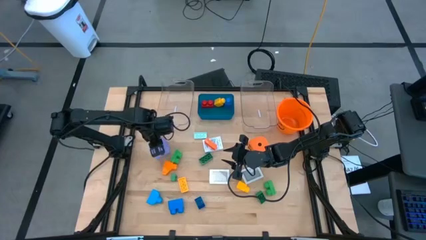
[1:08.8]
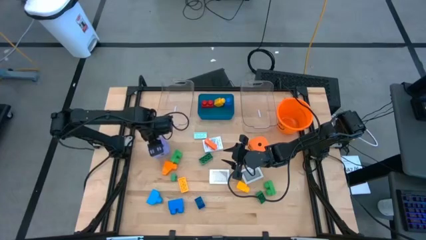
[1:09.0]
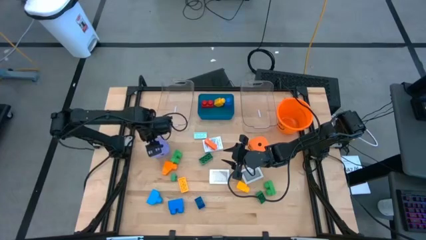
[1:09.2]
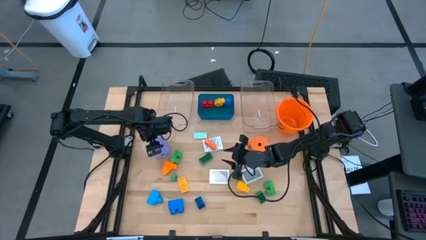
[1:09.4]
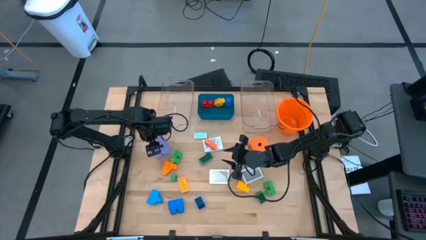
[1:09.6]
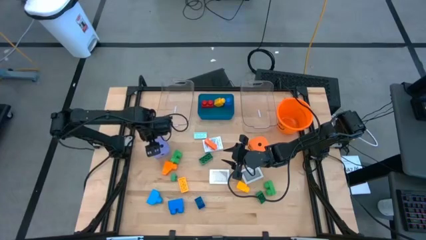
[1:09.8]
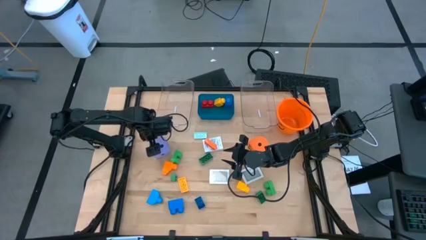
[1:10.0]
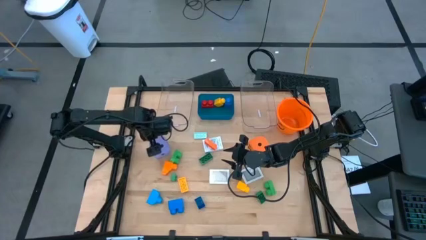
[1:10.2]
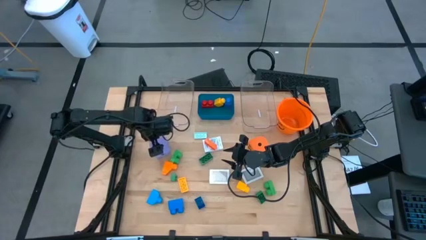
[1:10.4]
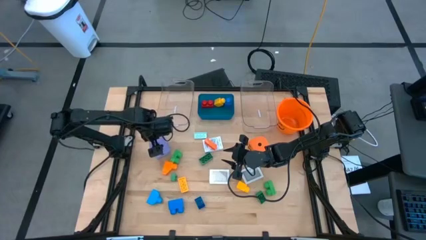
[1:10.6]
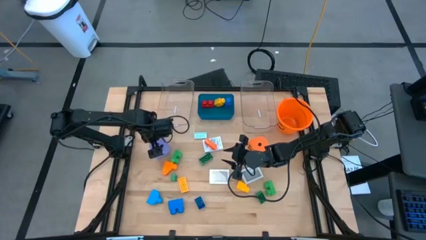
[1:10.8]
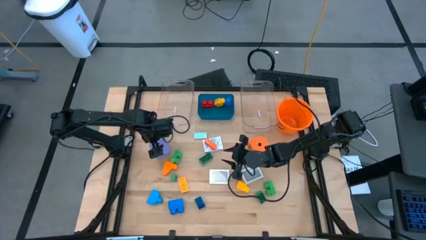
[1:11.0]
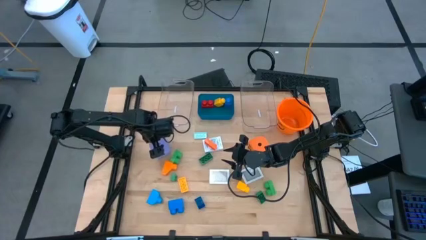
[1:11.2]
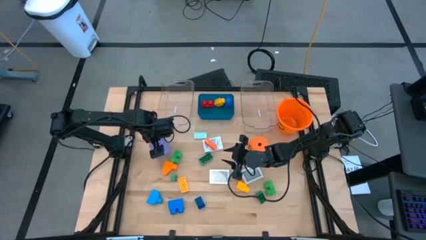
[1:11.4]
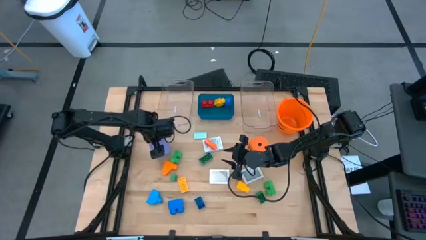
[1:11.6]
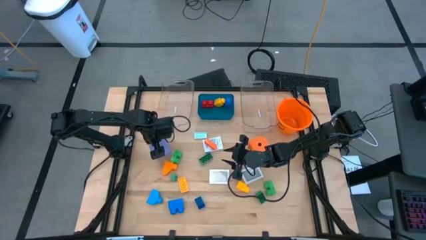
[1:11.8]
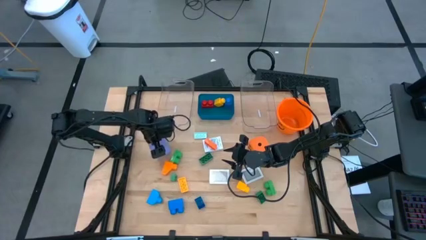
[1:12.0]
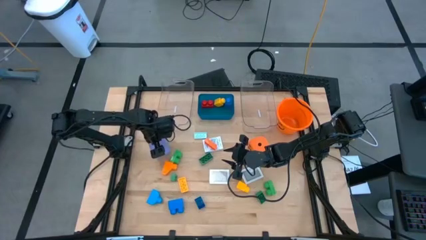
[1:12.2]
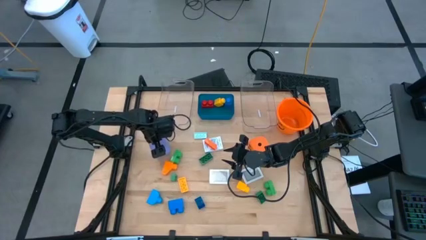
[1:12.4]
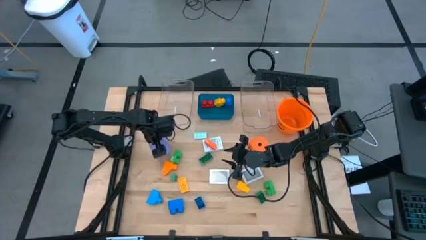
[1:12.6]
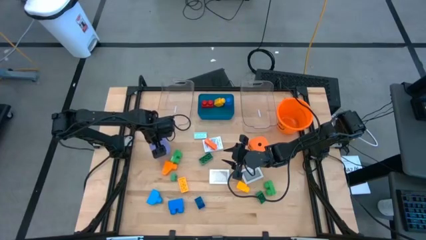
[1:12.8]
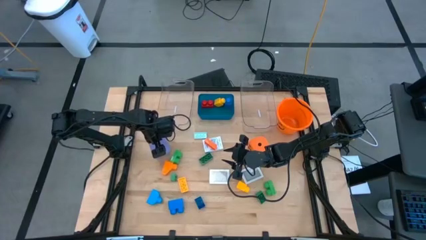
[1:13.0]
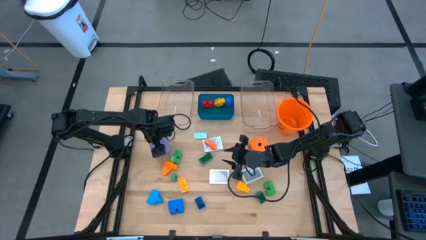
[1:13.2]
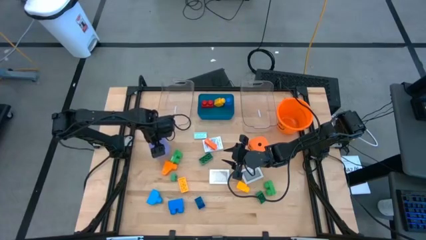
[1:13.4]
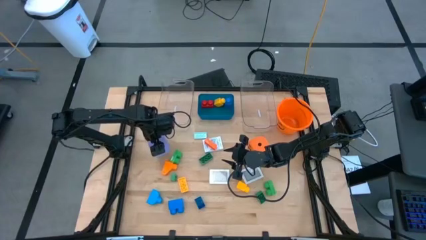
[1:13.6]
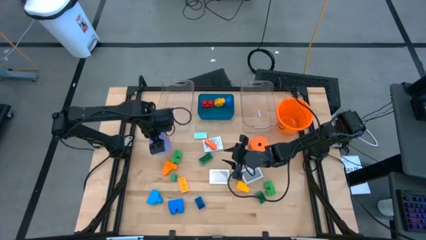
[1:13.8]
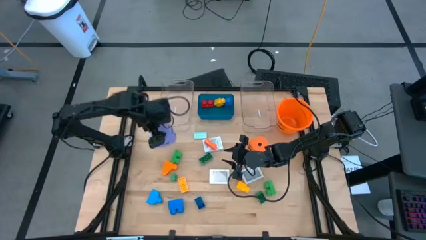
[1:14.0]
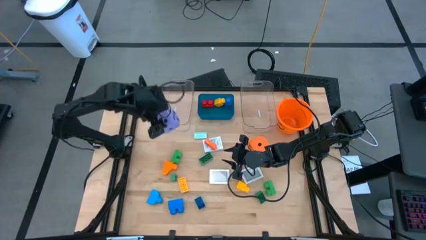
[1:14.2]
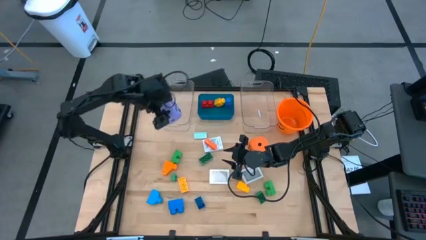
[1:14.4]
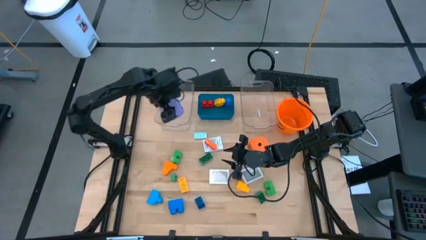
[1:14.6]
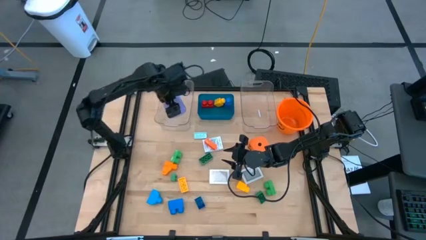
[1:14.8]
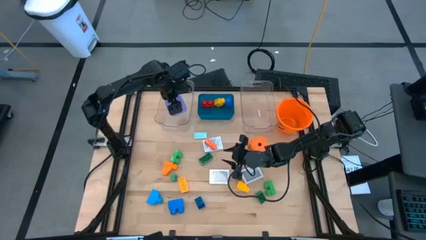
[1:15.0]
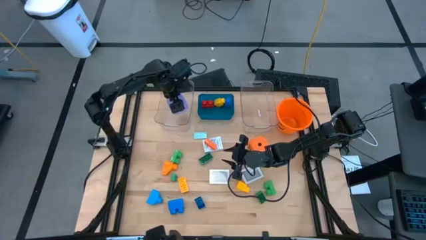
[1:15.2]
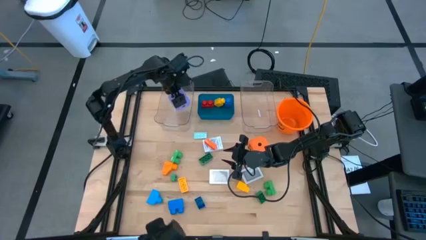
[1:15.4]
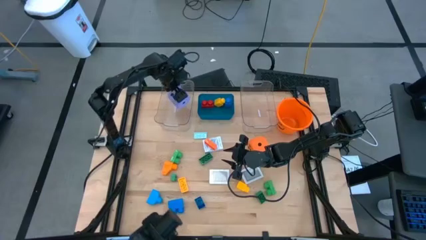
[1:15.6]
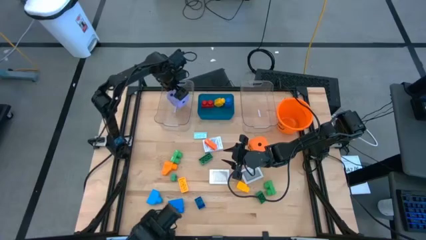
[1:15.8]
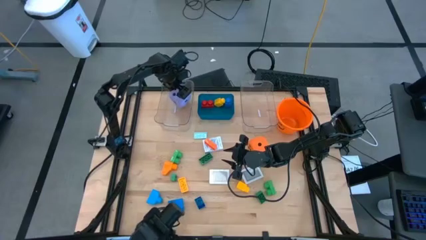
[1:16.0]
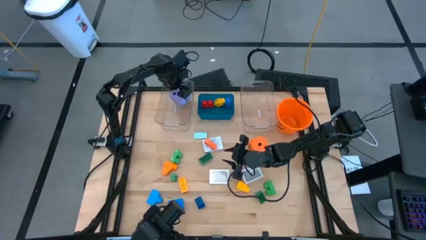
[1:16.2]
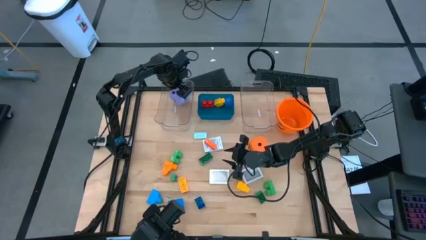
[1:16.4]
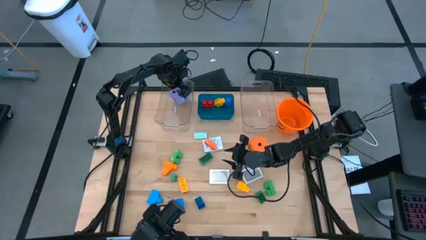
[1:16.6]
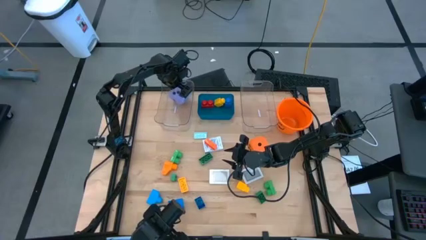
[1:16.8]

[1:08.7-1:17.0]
Task: Pick & Place Toys
Put the purple dice into the left transparent bin

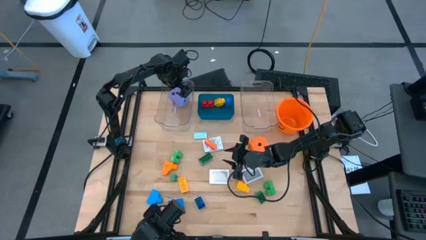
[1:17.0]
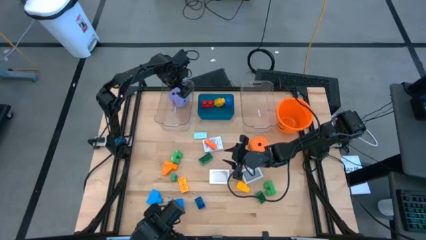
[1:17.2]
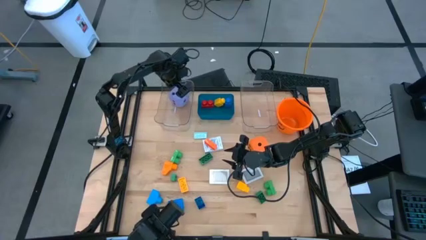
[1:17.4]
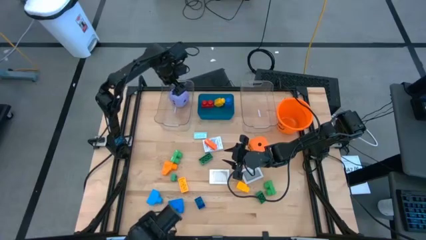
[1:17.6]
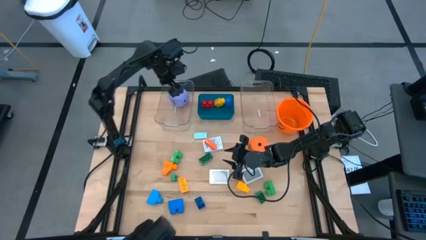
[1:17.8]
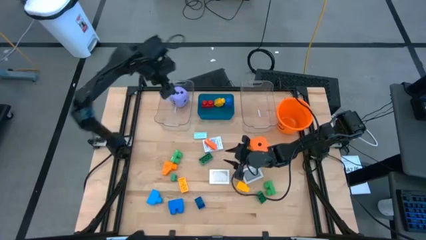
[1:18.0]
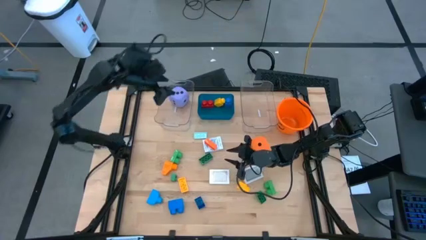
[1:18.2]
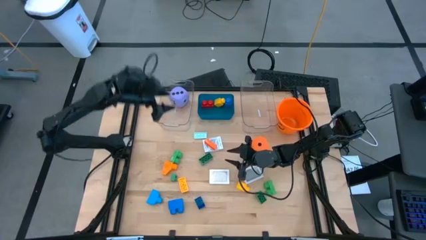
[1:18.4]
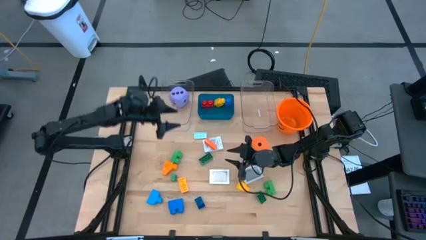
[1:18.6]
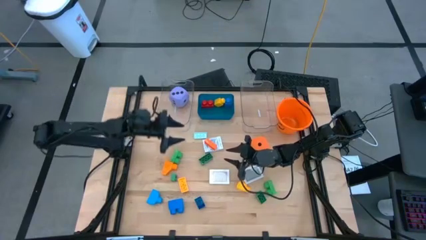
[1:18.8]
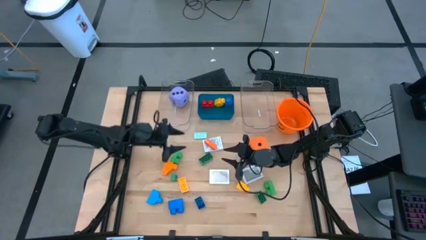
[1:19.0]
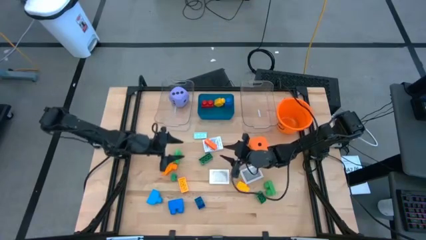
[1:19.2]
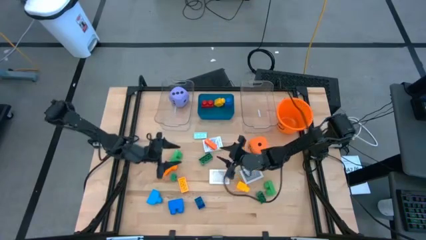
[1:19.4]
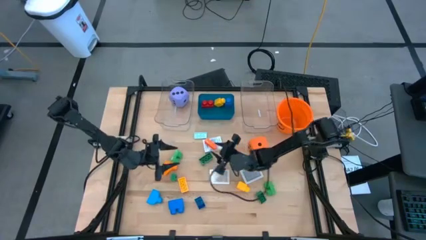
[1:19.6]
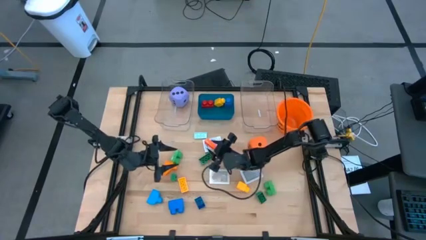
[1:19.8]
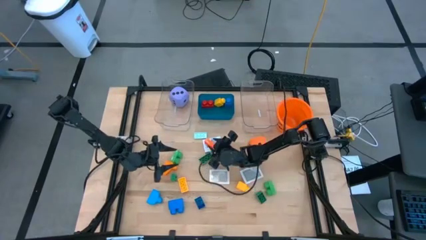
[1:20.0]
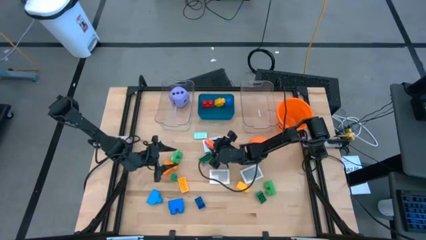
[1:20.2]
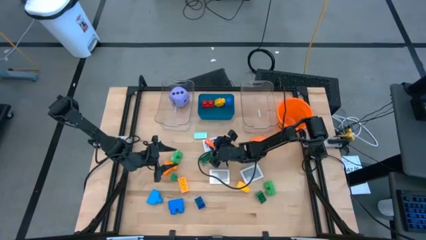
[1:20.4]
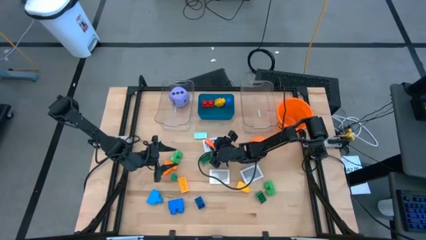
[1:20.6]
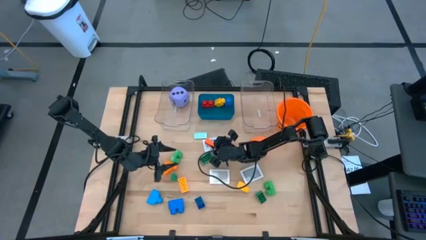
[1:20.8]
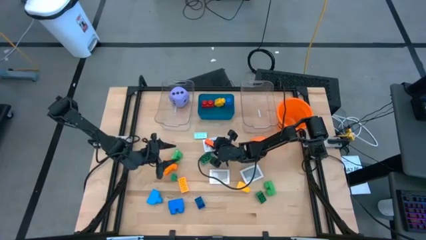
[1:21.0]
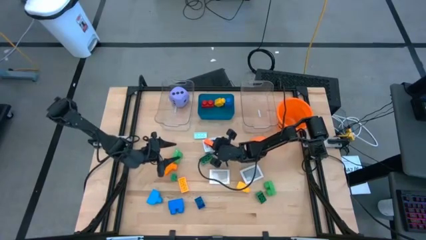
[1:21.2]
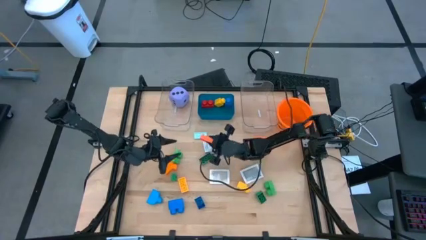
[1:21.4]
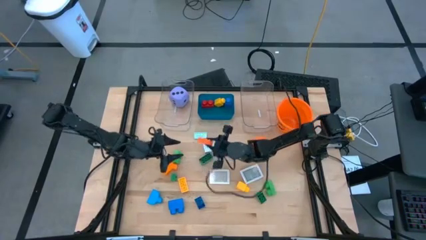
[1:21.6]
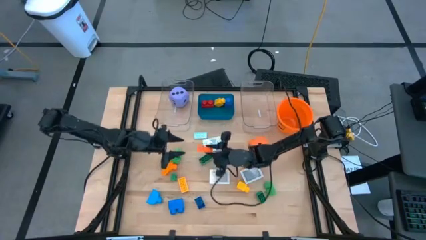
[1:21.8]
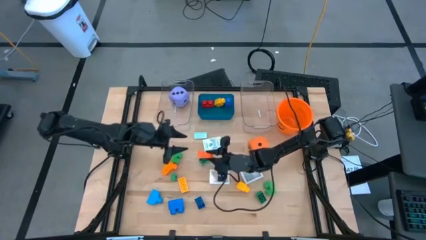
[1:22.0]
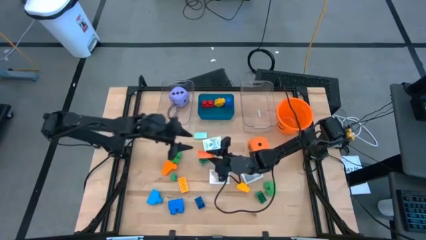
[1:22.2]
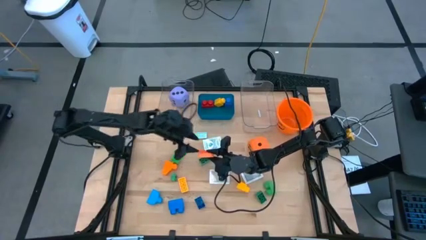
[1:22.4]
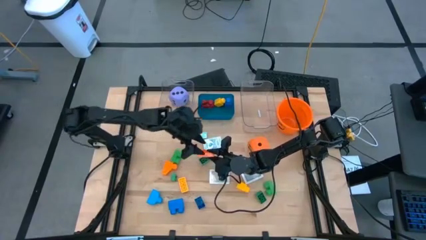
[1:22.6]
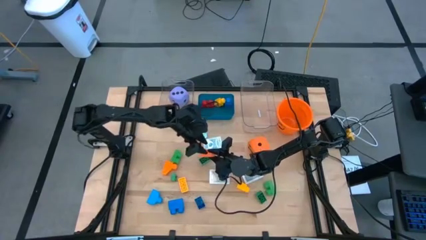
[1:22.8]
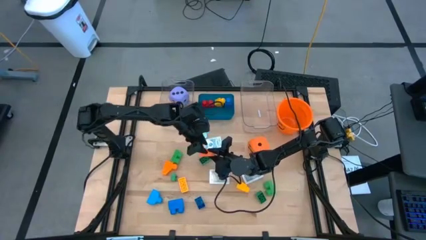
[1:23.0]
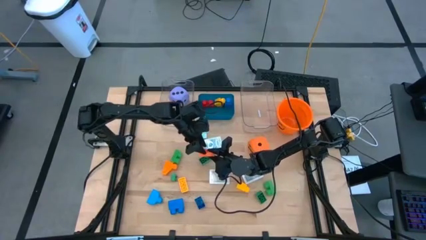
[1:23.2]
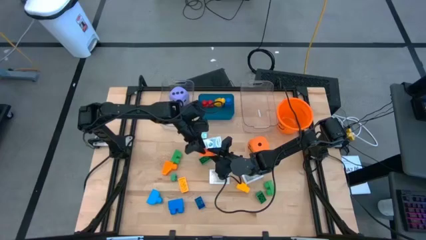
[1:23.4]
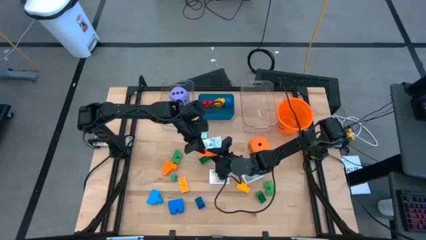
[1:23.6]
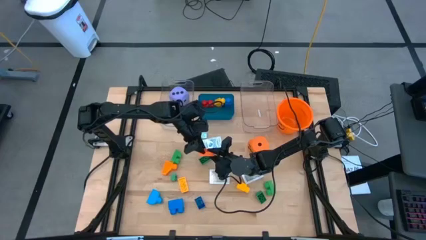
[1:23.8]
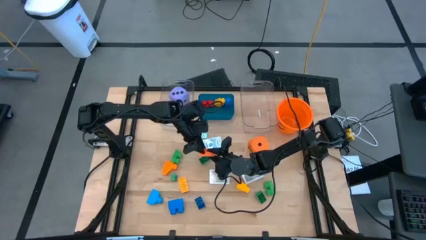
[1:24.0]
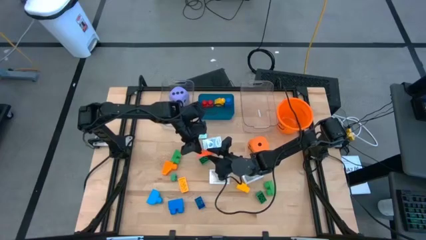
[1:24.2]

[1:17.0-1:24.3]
Put the orange game piece into the blue bin
